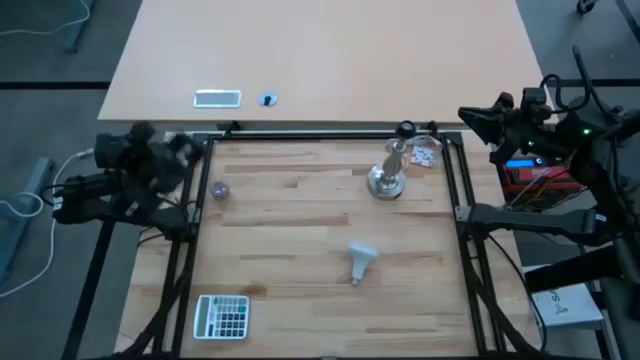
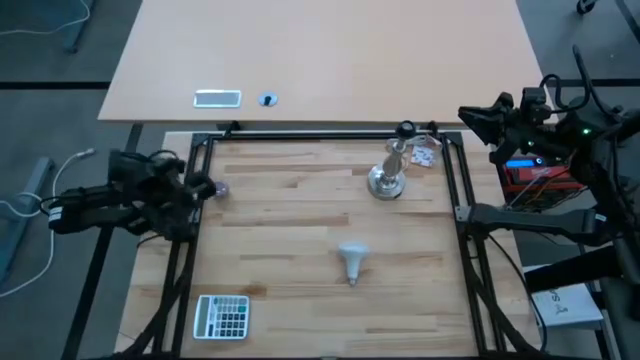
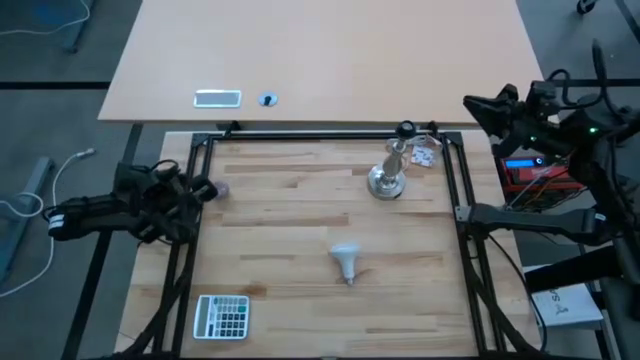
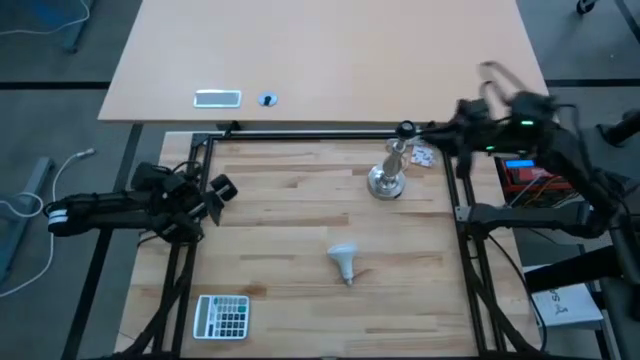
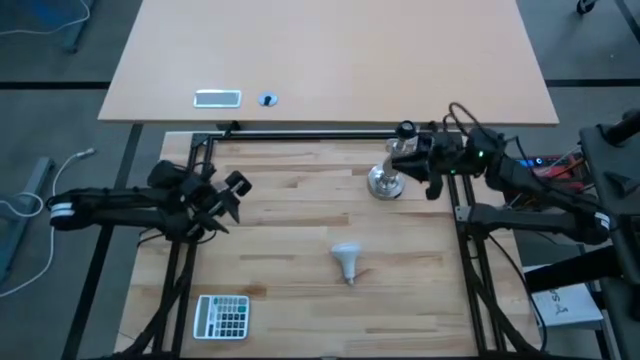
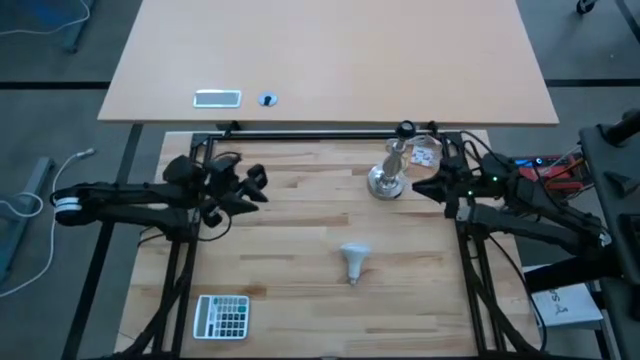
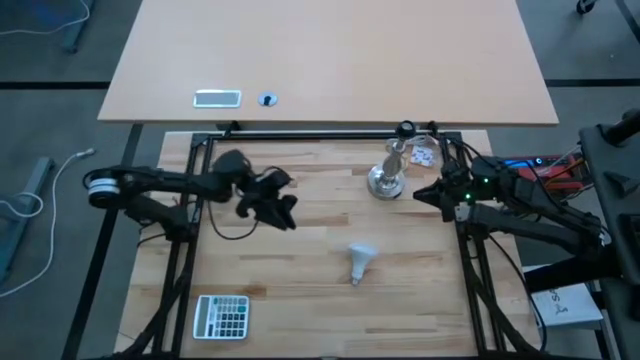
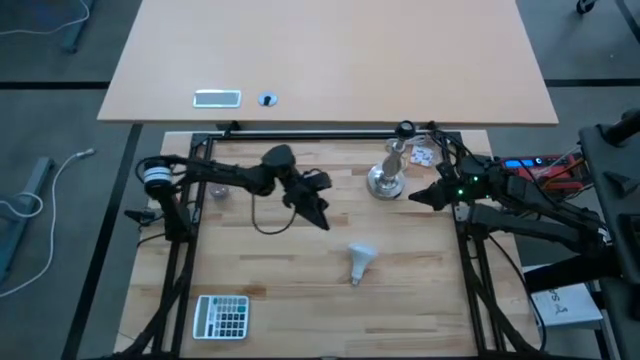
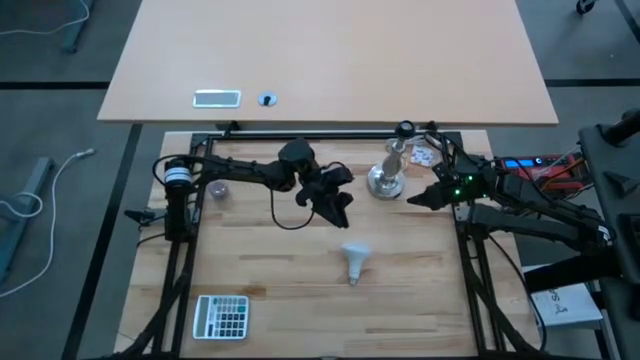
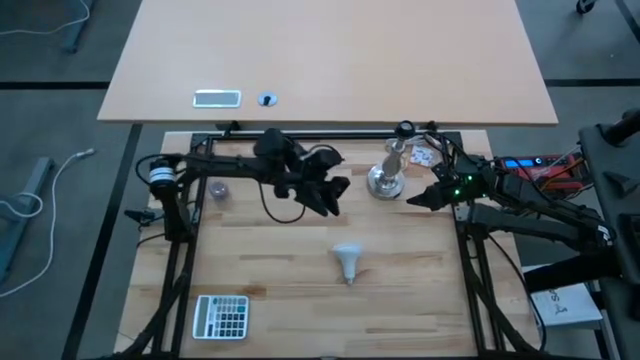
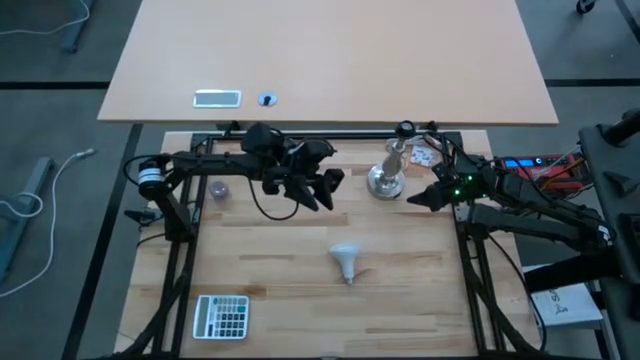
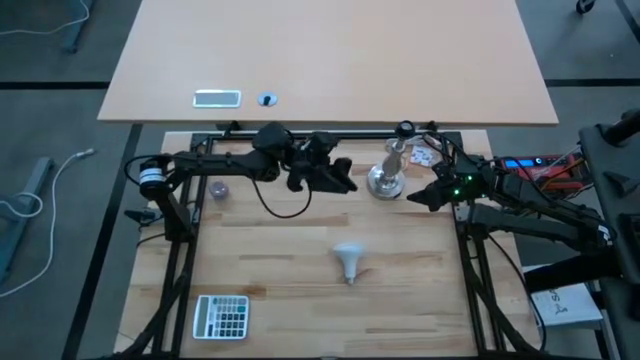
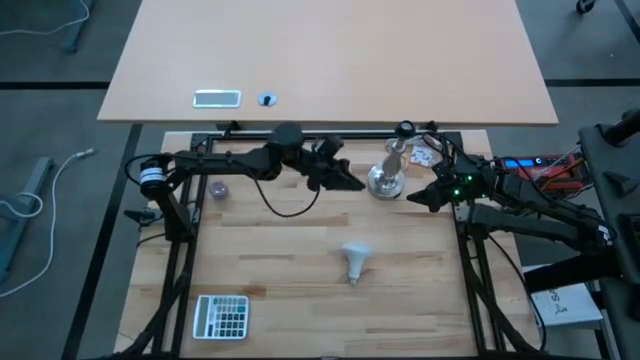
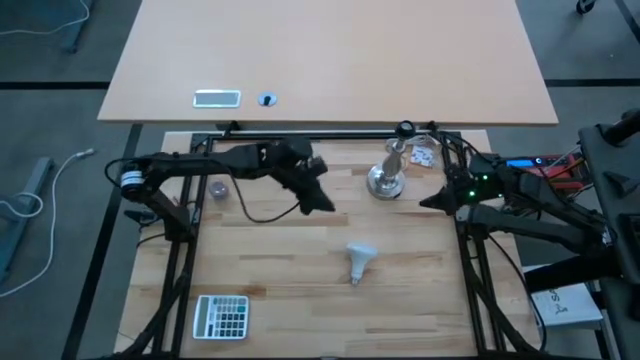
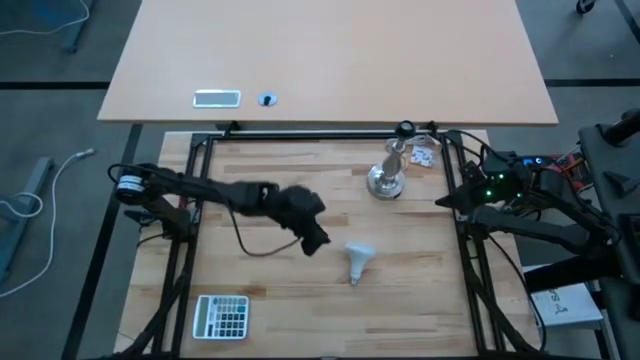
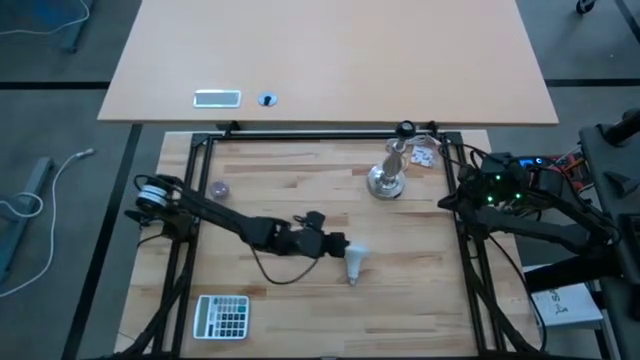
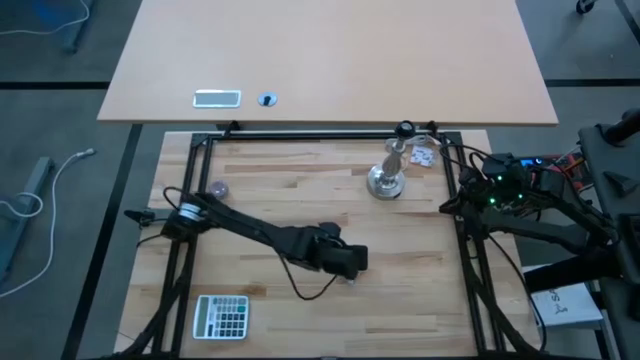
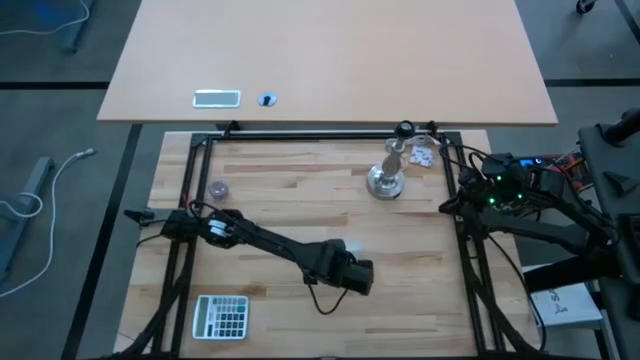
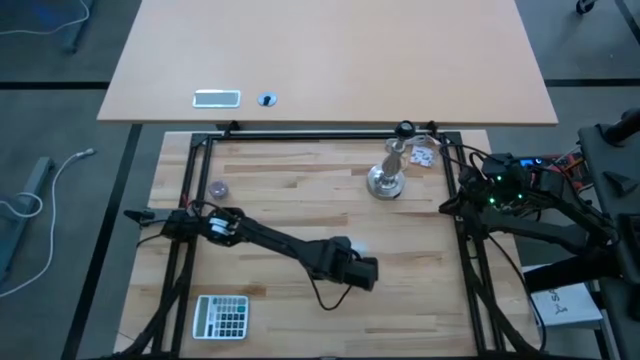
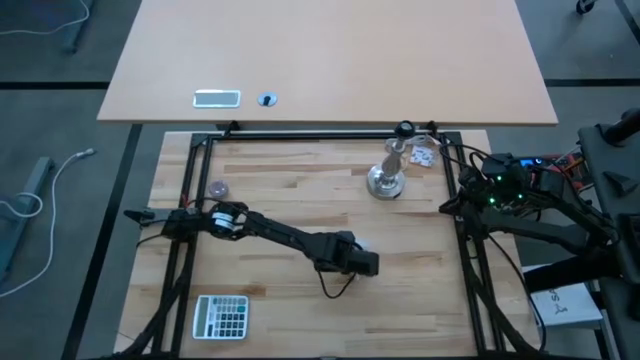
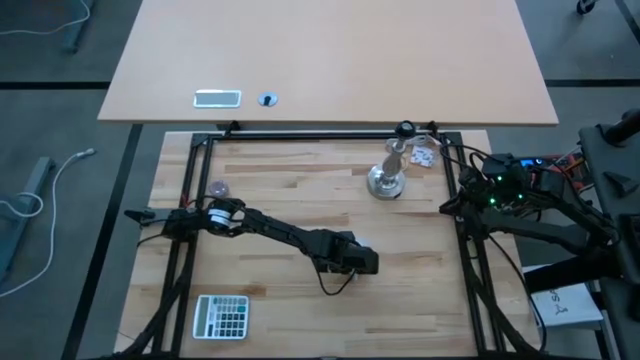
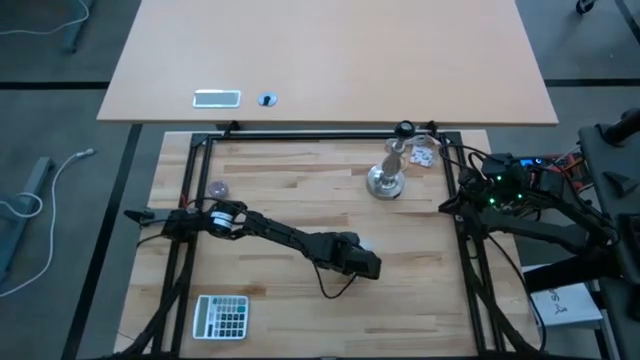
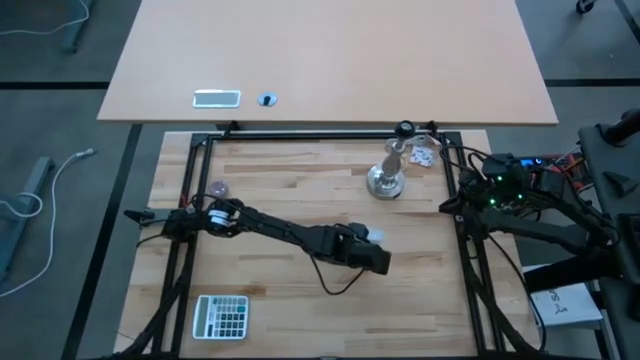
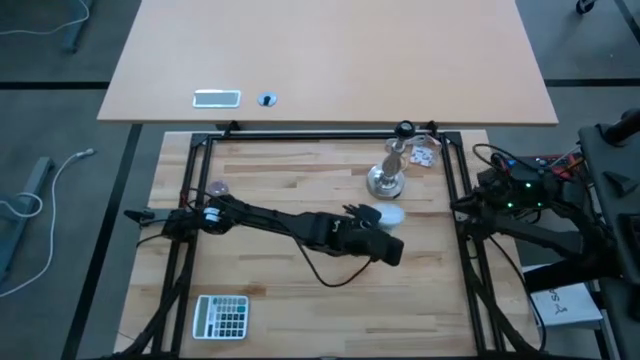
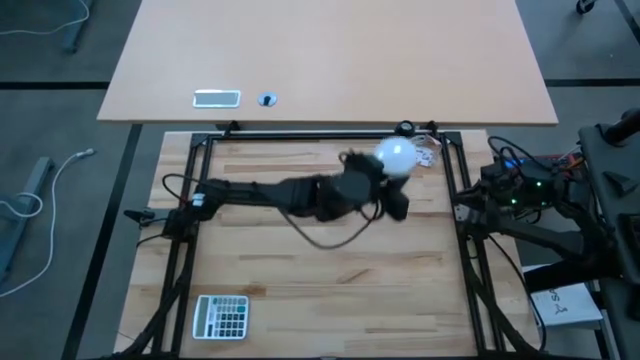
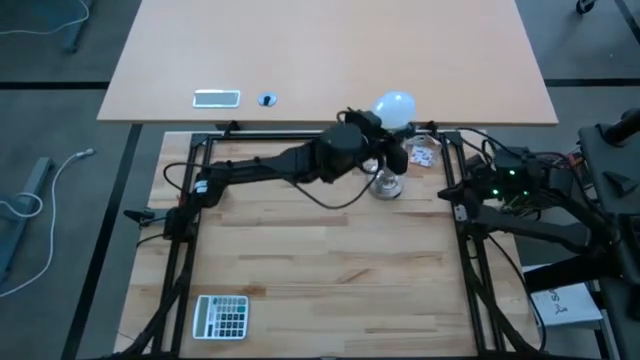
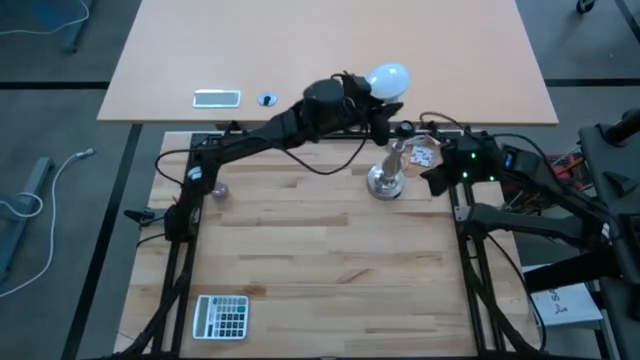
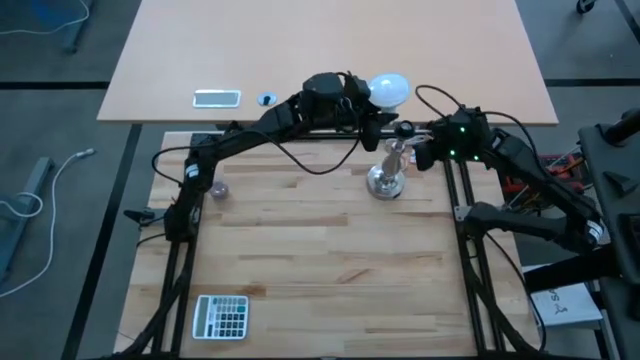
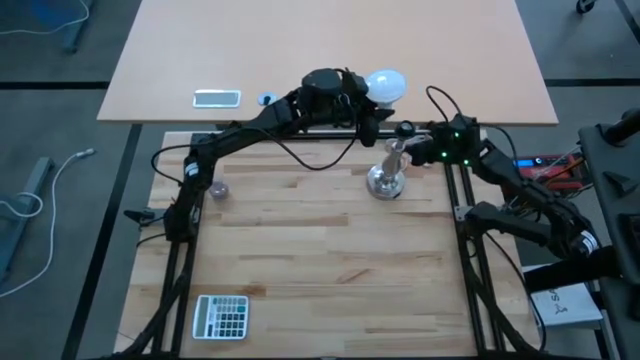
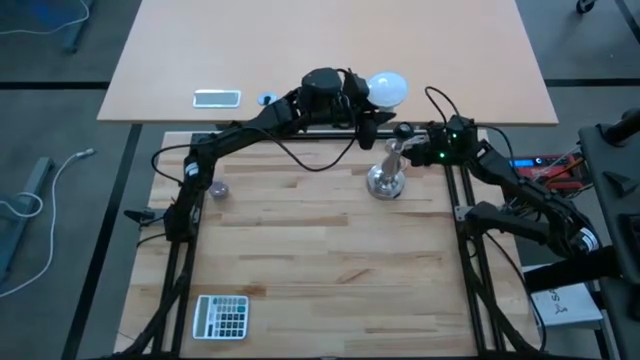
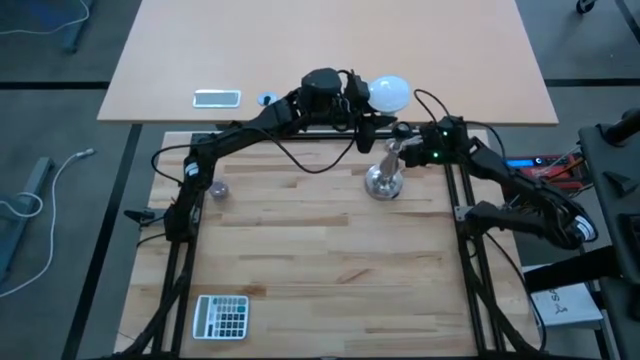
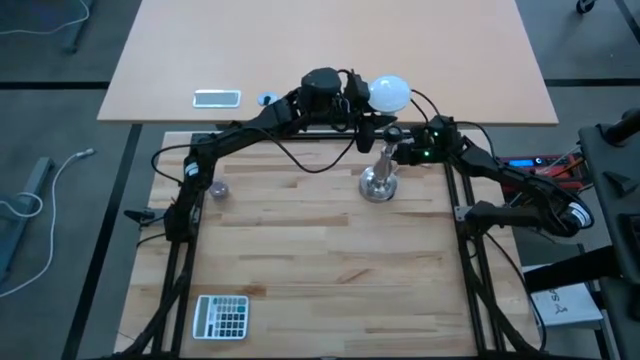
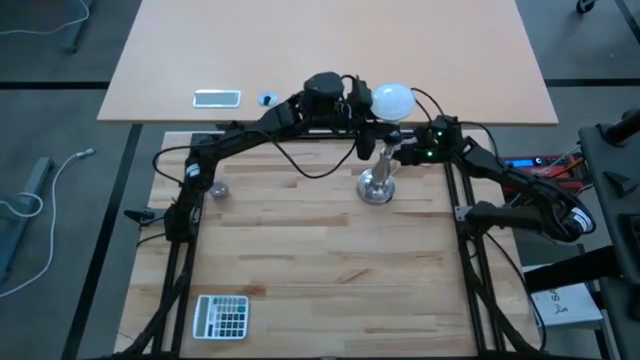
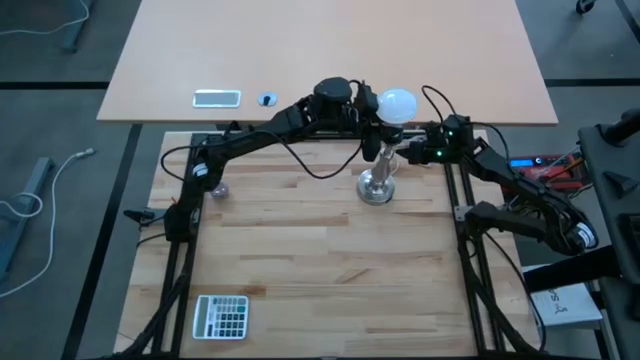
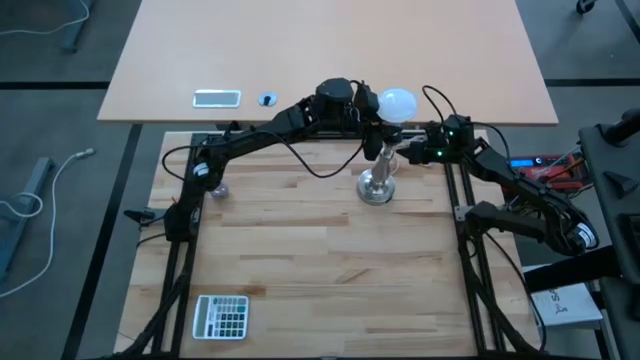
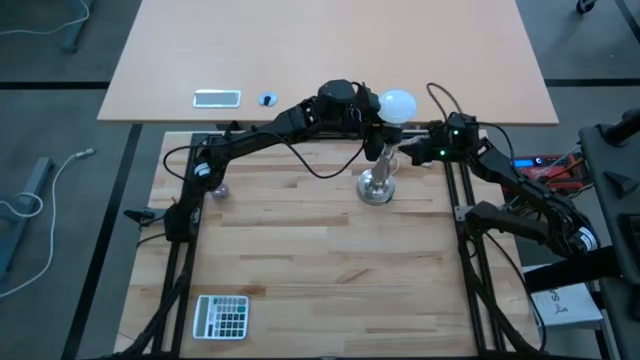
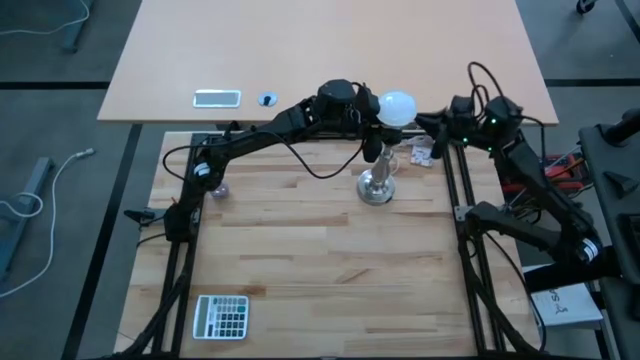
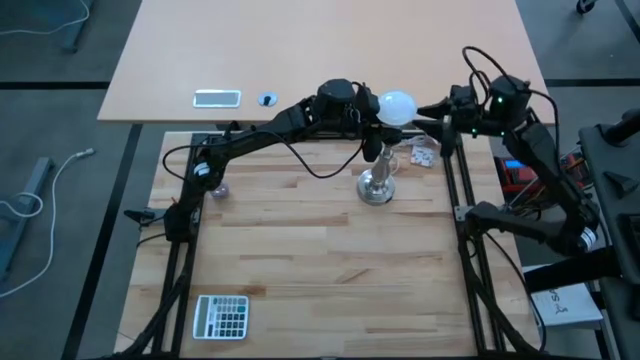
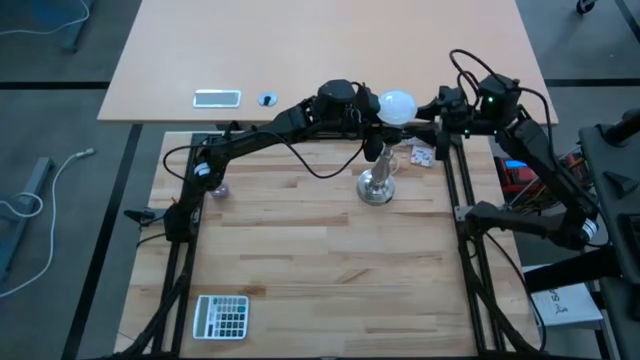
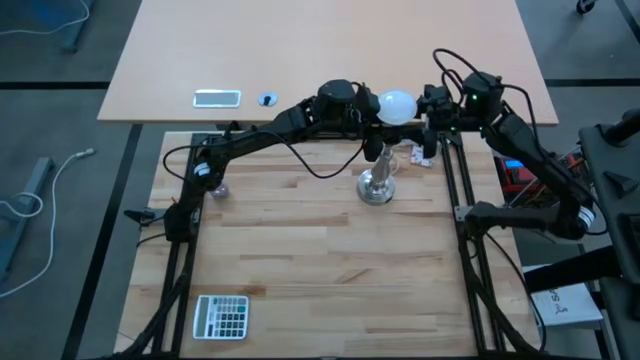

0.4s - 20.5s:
Task: Screw lightbulb
Insert the light bulb into the lamp
